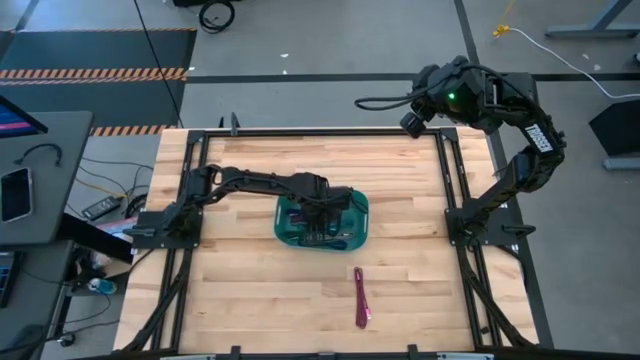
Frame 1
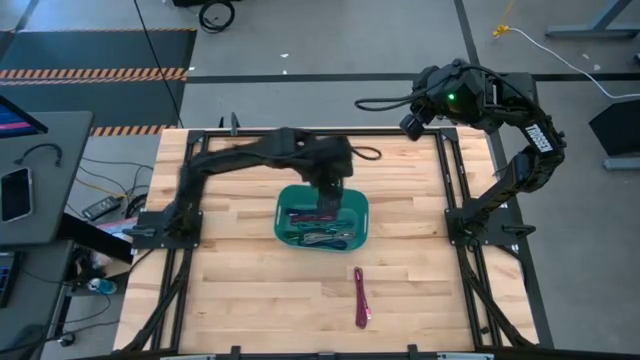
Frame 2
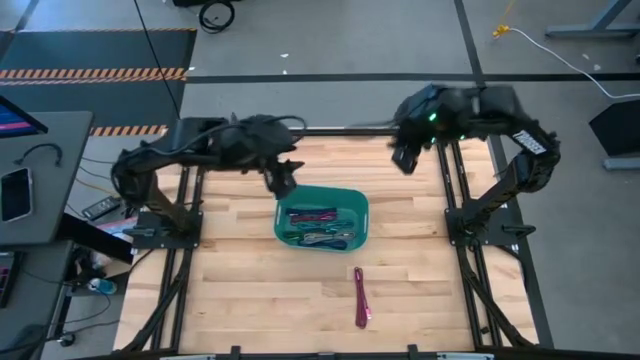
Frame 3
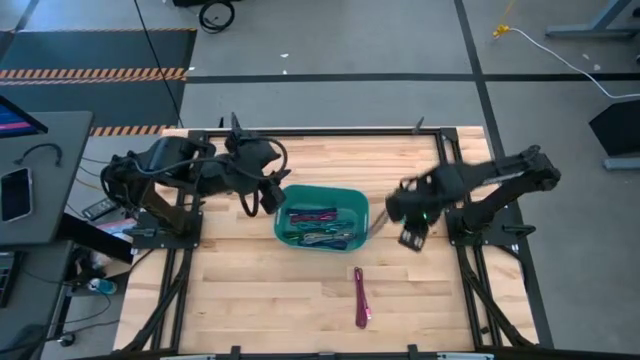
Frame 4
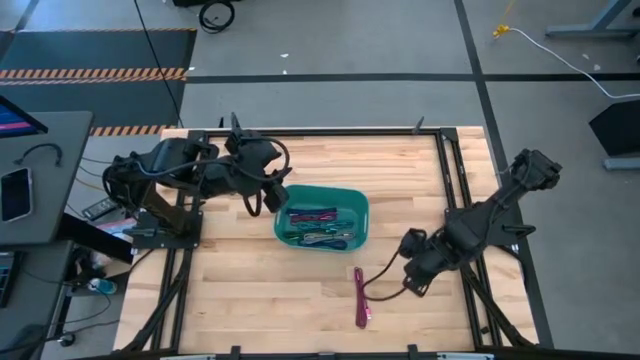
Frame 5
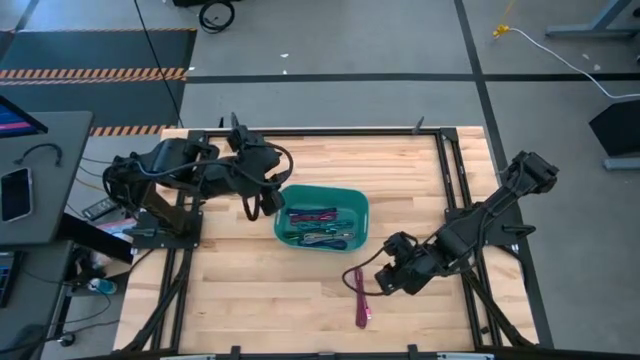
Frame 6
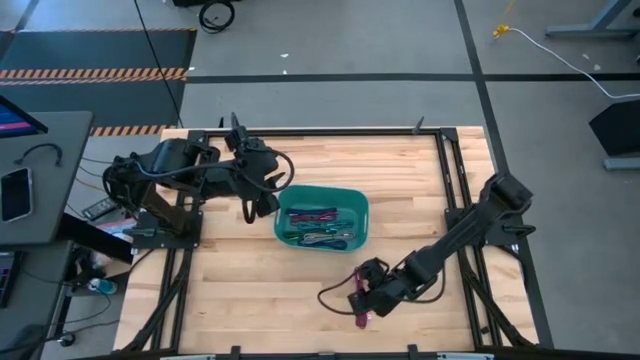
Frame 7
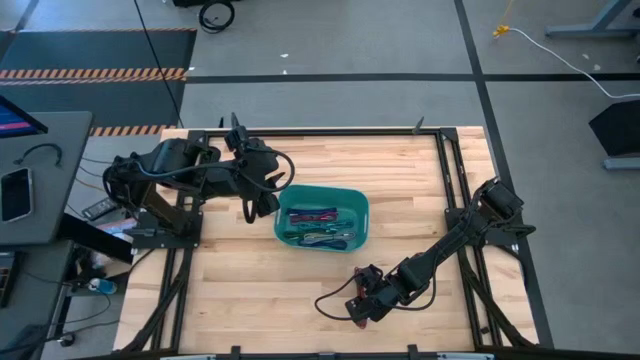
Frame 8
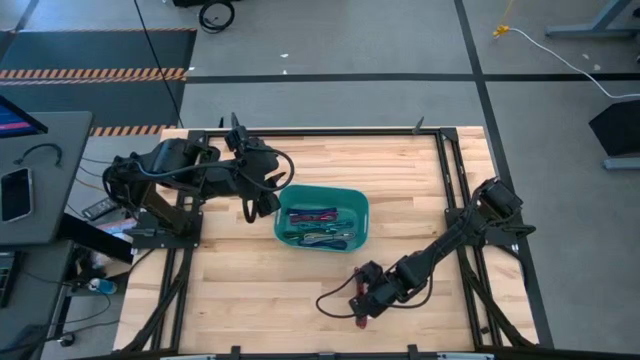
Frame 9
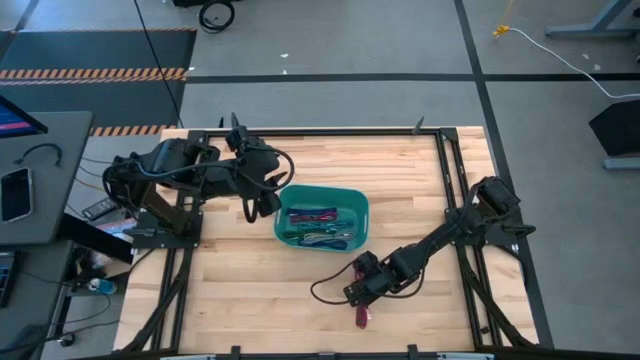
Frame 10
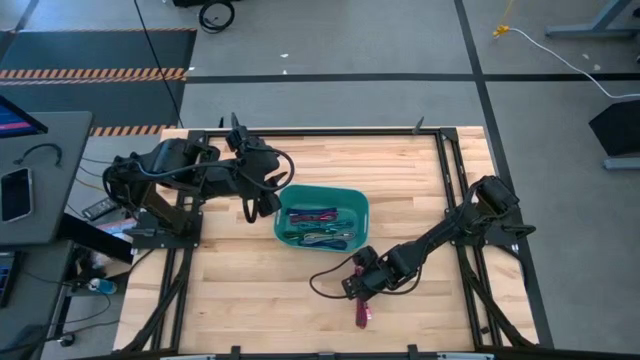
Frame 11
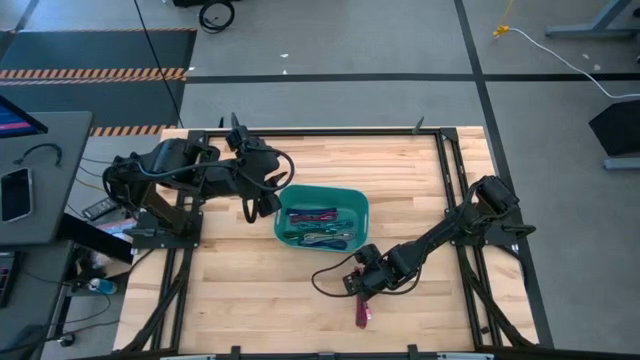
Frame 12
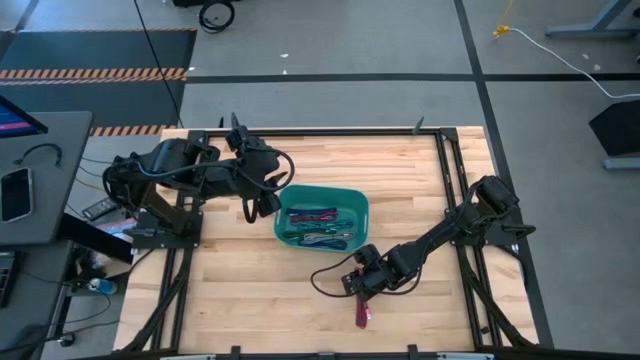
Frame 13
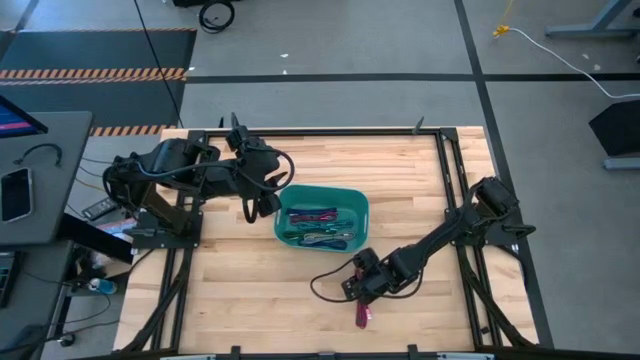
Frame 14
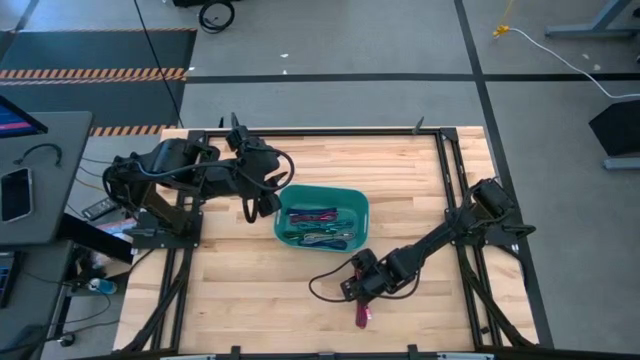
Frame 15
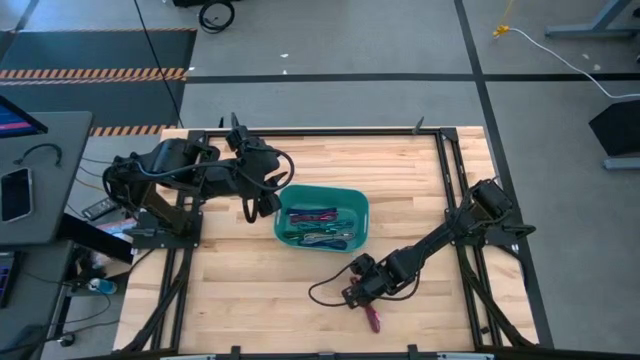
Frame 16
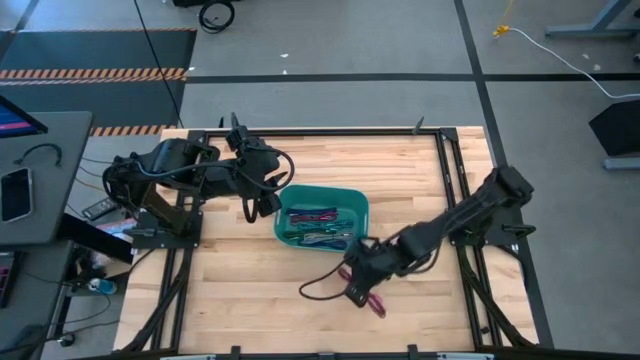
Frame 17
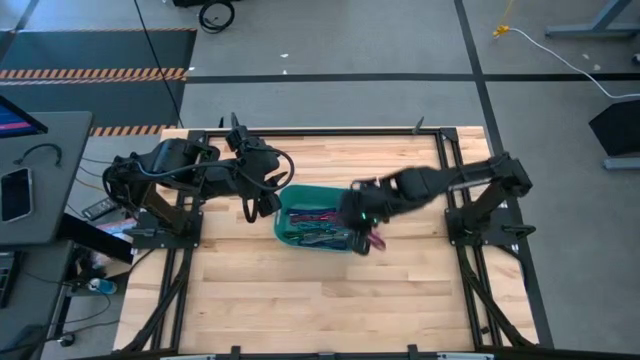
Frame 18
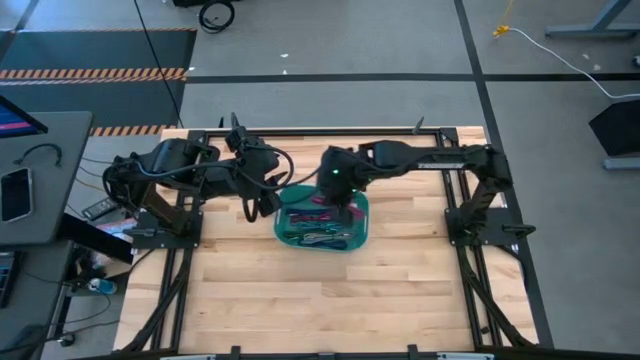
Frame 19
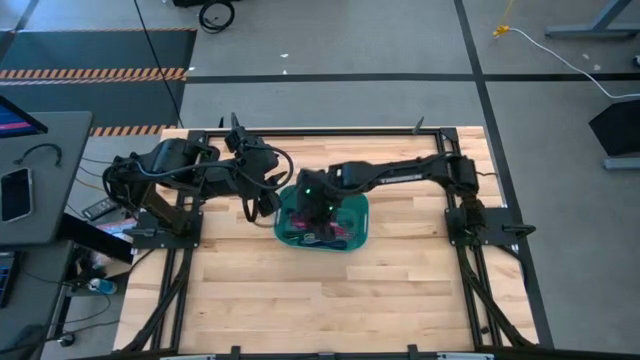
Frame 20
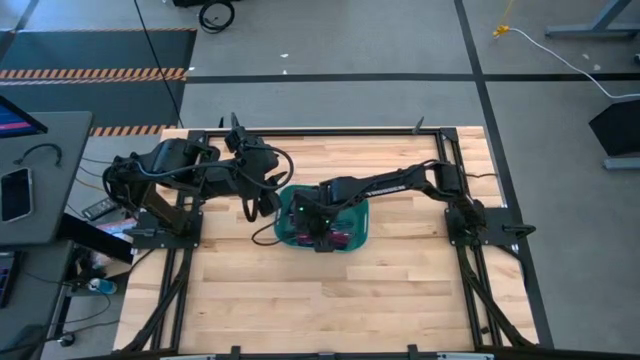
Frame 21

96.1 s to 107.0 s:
Task: Pick and place USB-C Cables
Put the pink charger cable into the green bin

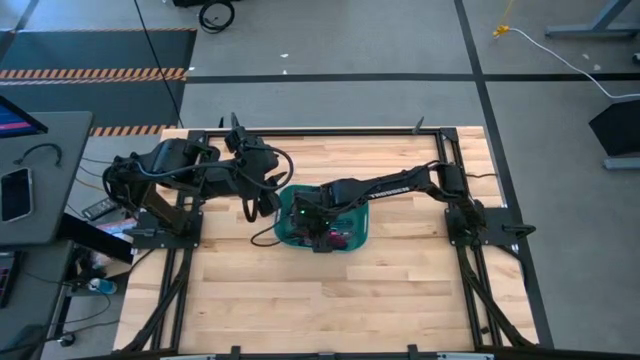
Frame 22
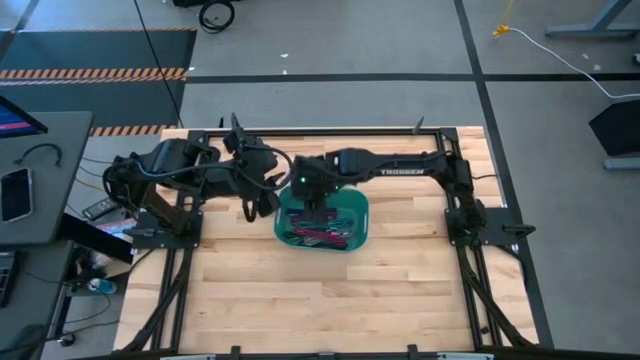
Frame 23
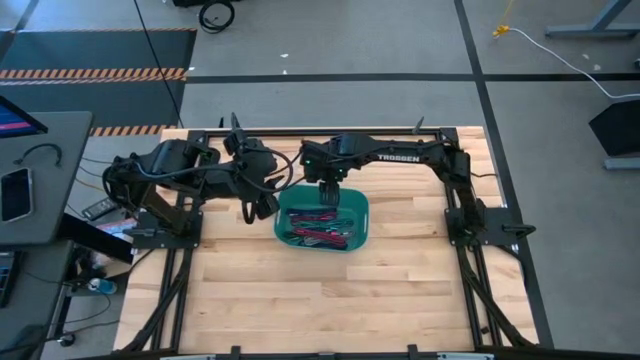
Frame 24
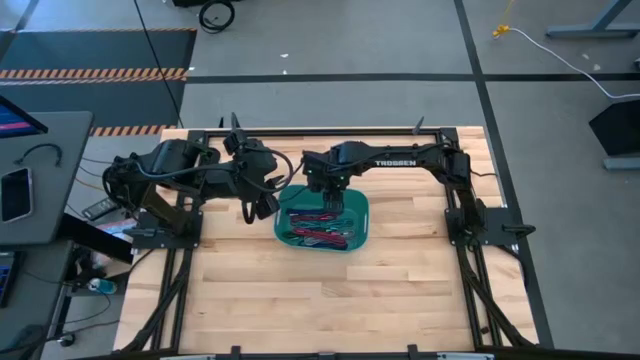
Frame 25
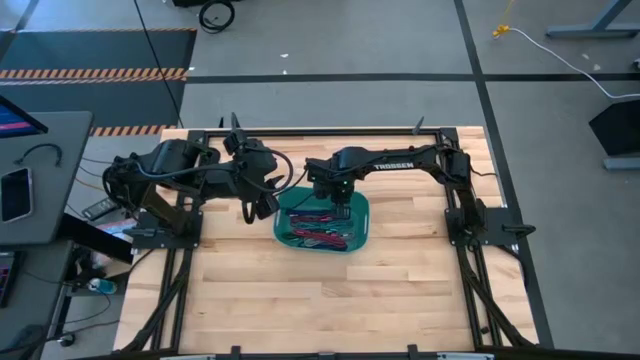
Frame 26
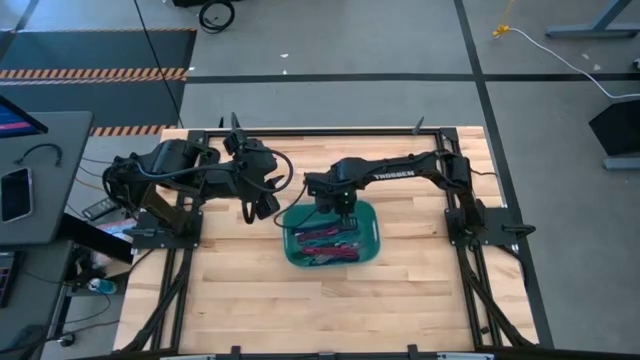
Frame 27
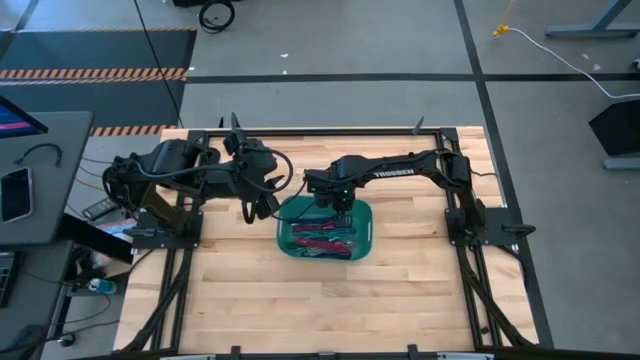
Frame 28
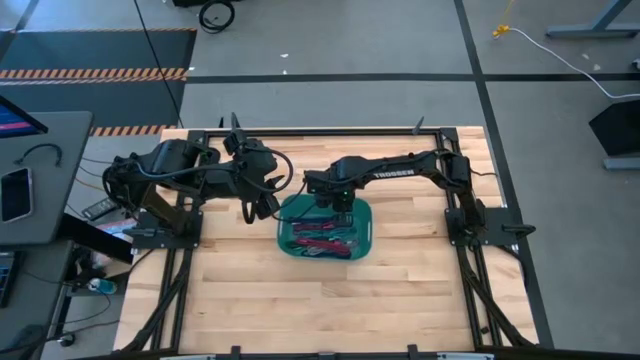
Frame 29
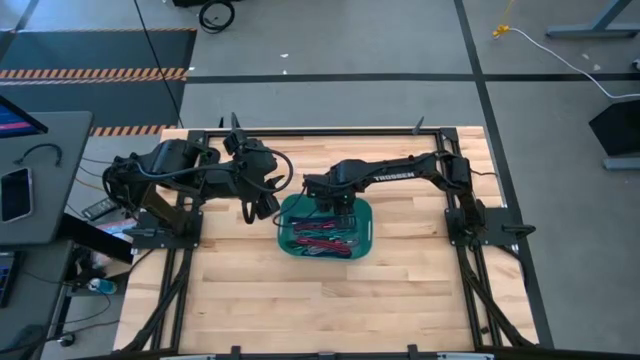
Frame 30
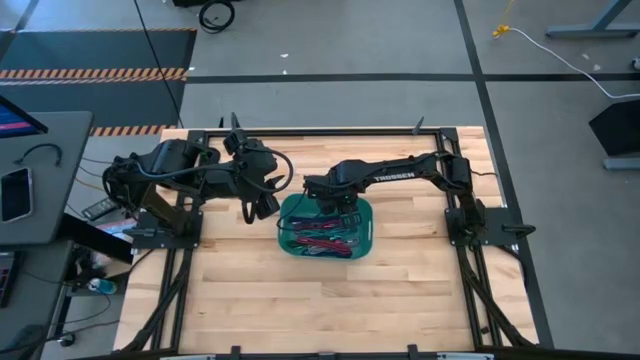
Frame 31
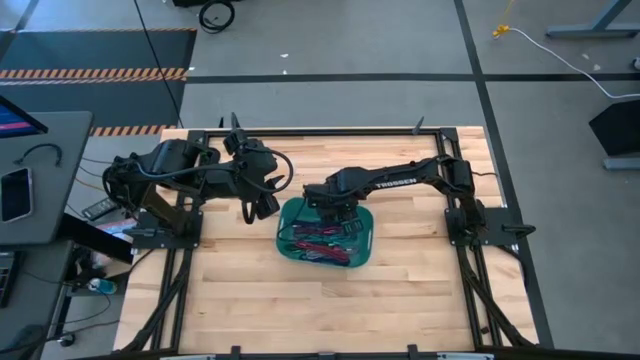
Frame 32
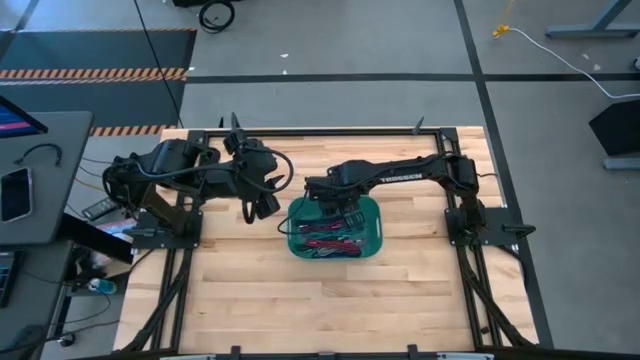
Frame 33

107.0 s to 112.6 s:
Adjust the green bin on the table

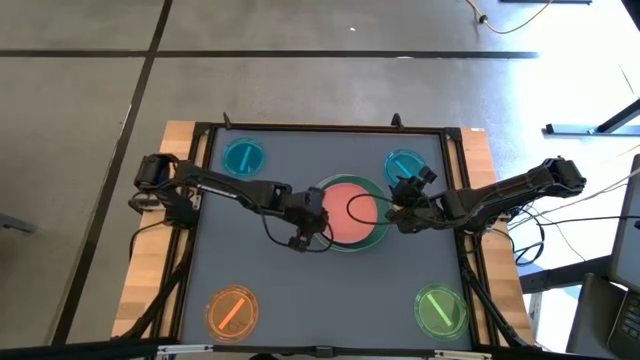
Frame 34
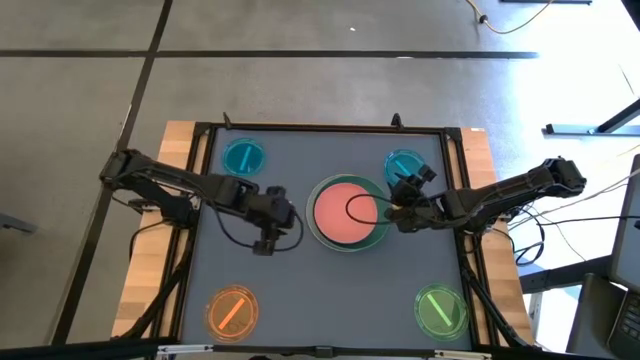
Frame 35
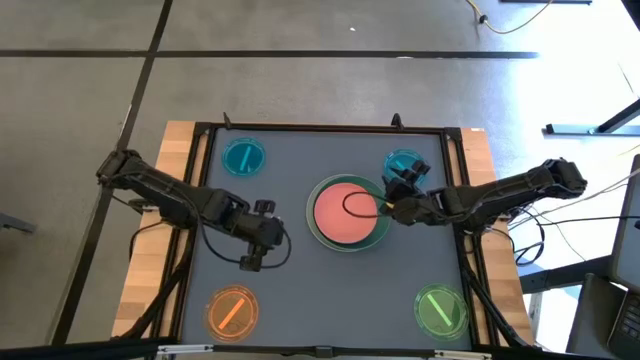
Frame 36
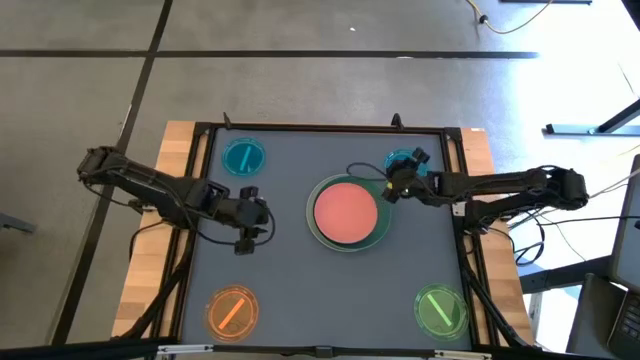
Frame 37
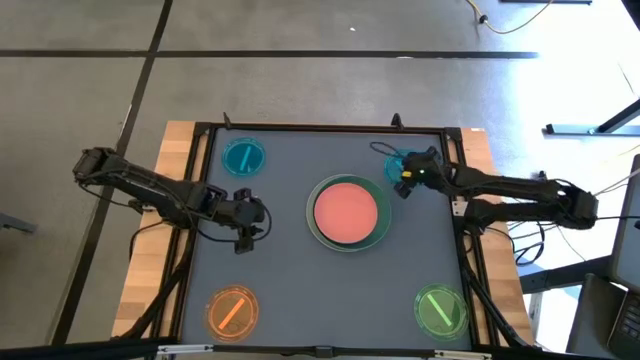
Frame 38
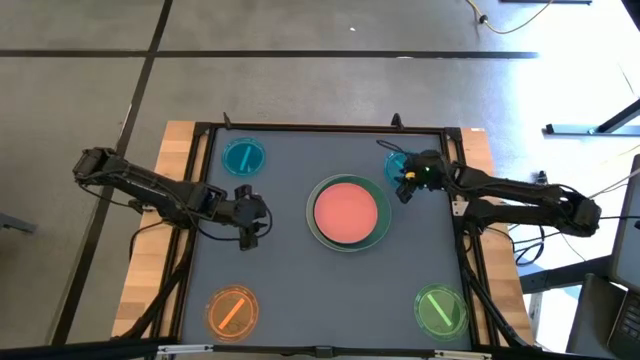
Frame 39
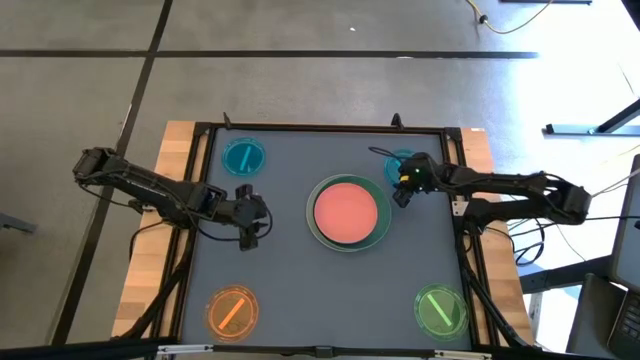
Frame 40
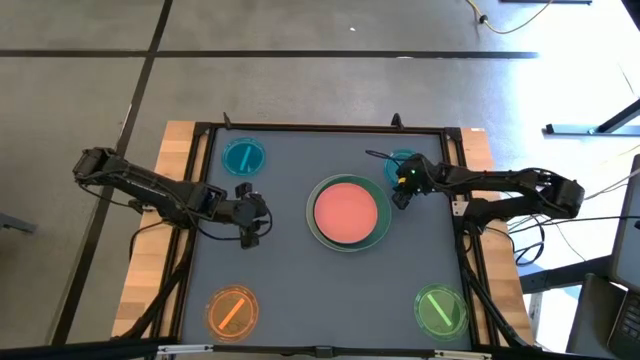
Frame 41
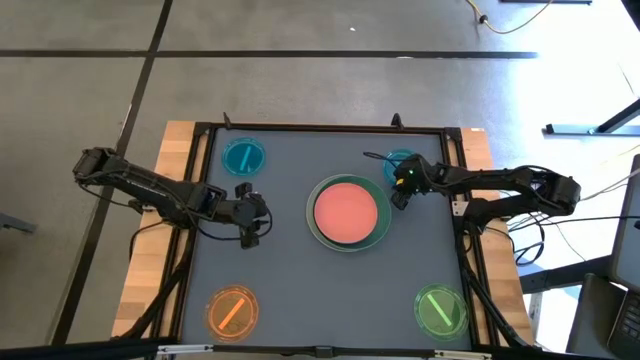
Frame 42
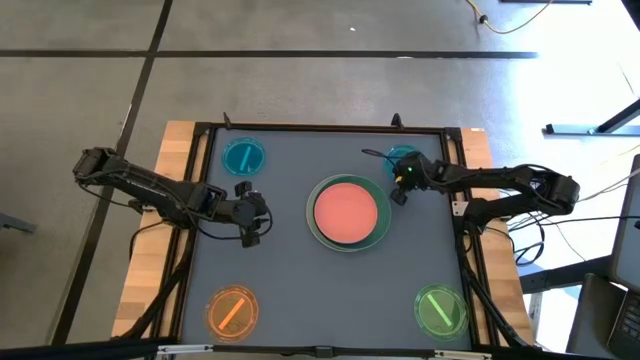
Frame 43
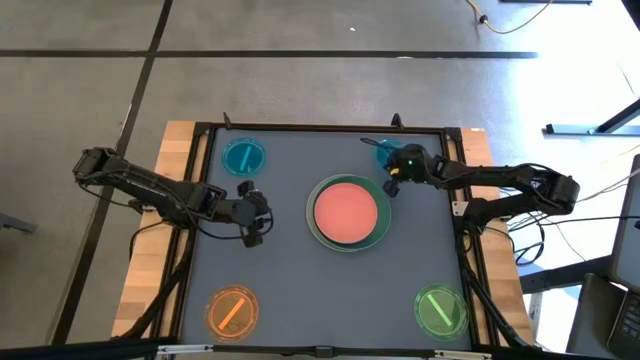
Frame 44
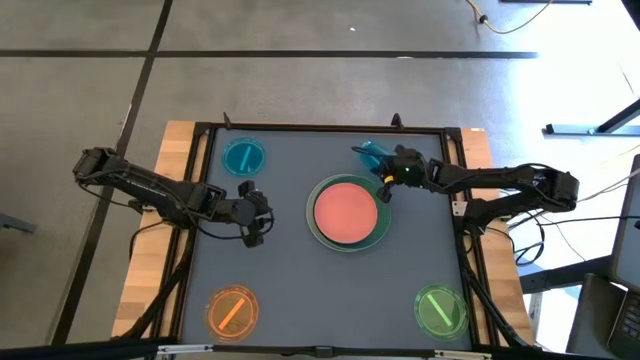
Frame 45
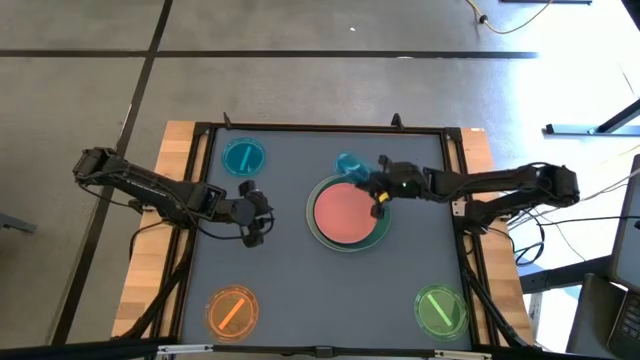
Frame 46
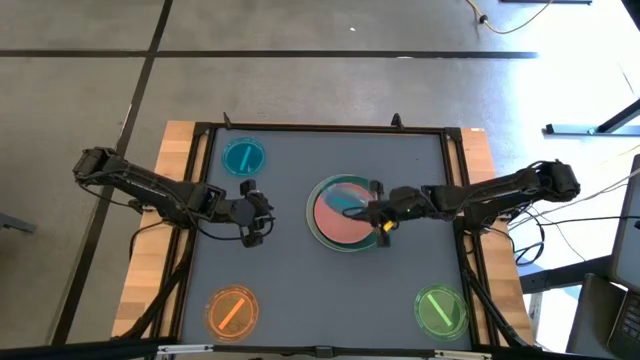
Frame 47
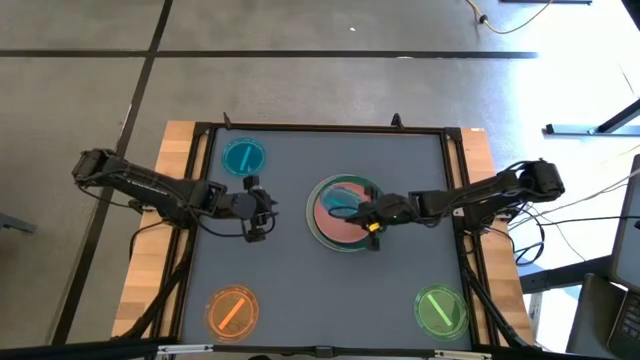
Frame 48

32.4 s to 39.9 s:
Task: Stack plastic plates
Stack the right transparent blue plate on top of the orange plate
